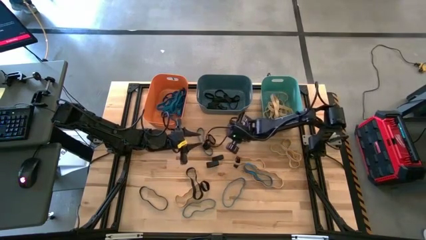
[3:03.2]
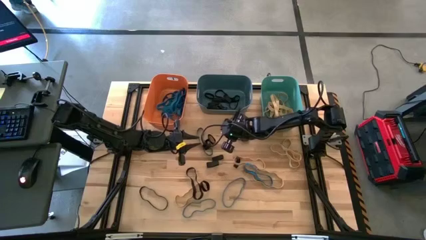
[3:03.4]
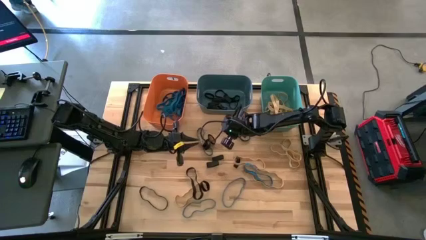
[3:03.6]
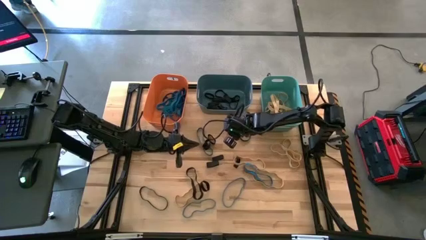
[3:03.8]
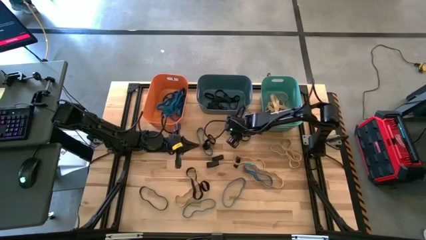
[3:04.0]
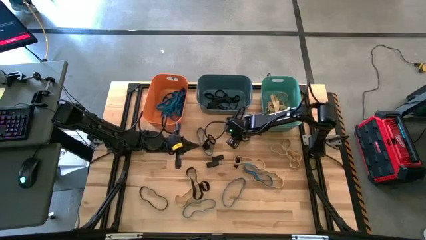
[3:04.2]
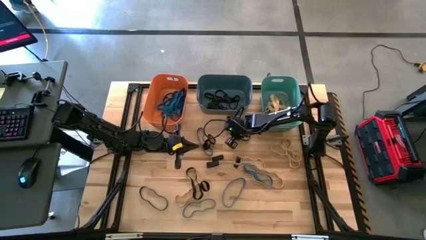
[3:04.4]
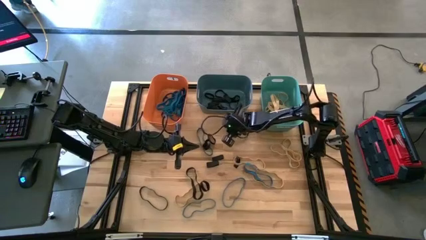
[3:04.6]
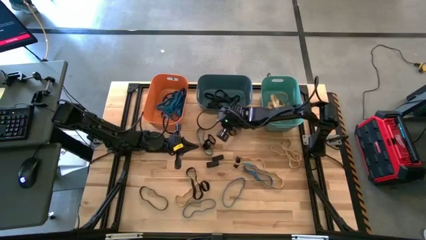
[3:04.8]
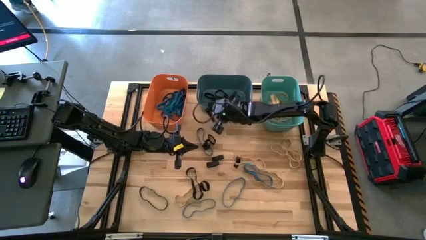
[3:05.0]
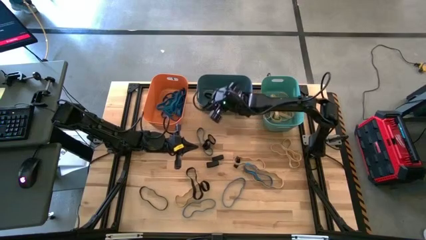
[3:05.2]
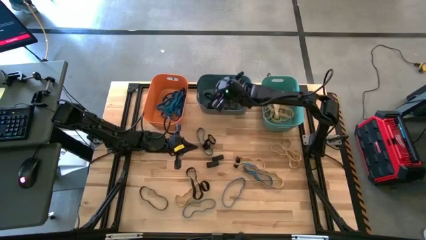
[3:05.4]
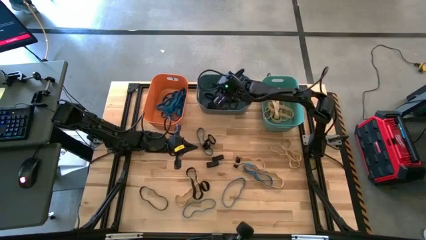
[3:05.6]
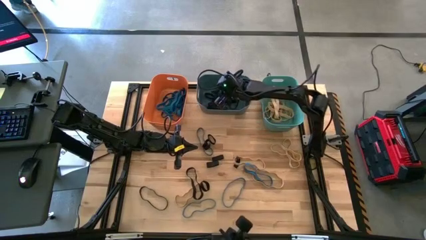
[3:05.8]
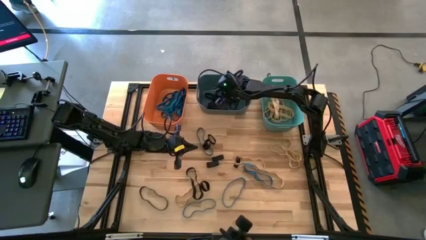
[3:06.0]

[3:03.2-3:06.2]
Task: Sort rubber bands into baskets
Put the black rubber band into the blue bin

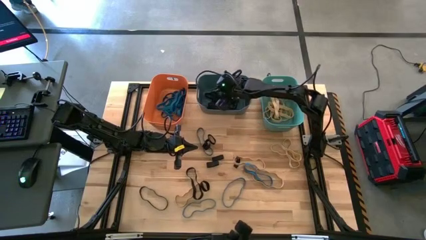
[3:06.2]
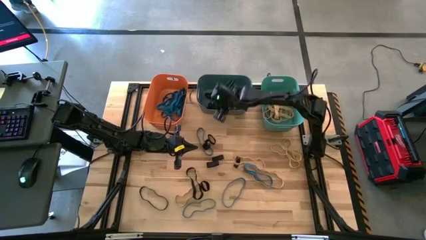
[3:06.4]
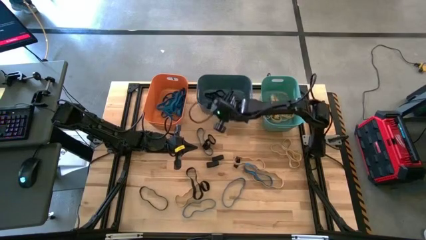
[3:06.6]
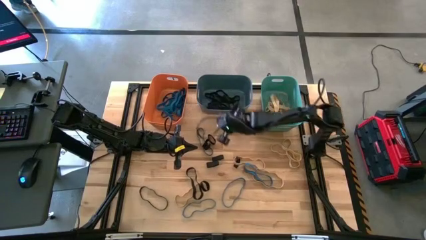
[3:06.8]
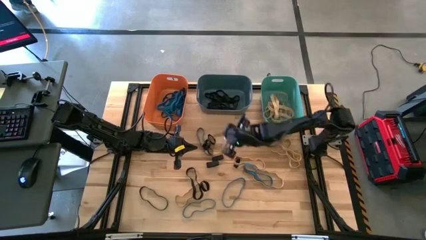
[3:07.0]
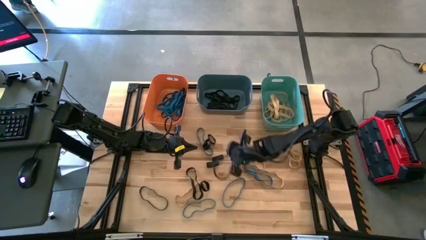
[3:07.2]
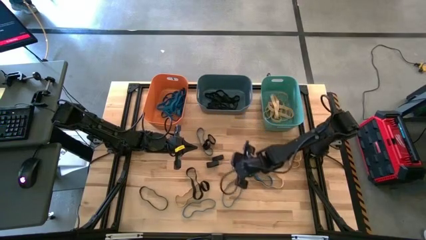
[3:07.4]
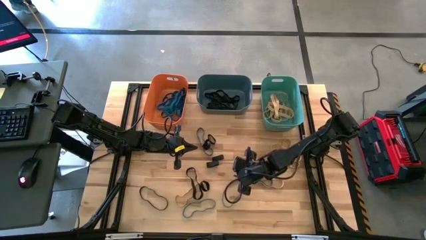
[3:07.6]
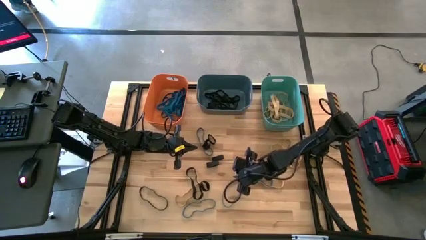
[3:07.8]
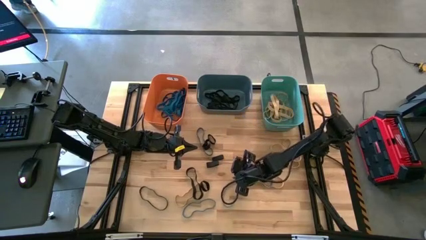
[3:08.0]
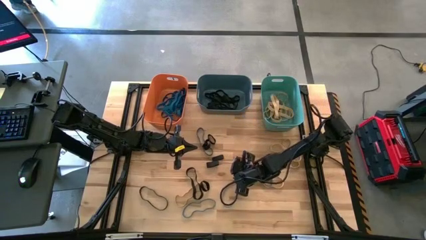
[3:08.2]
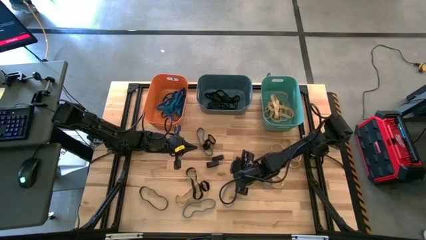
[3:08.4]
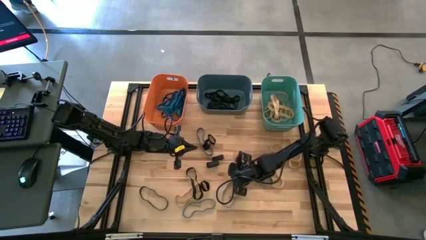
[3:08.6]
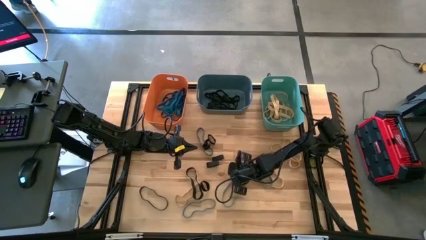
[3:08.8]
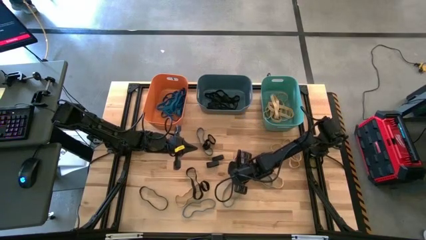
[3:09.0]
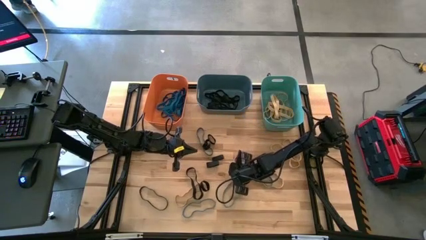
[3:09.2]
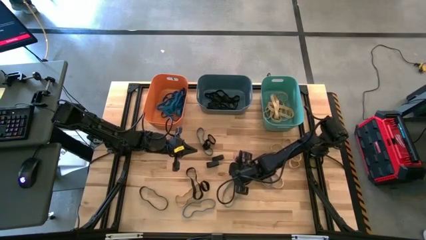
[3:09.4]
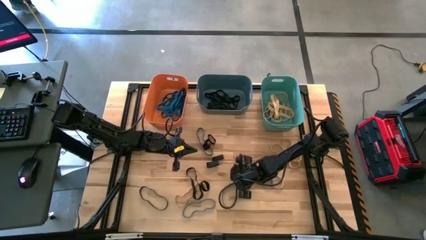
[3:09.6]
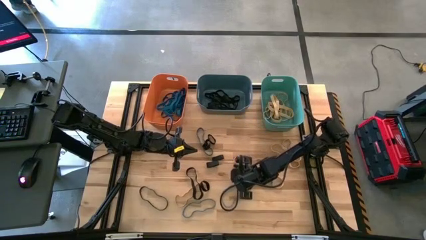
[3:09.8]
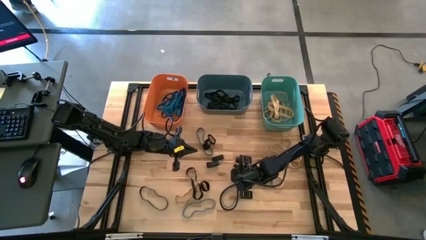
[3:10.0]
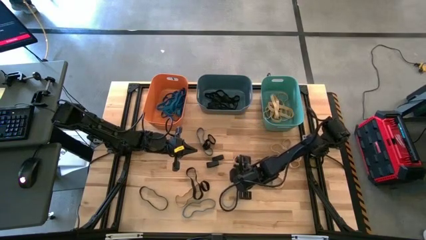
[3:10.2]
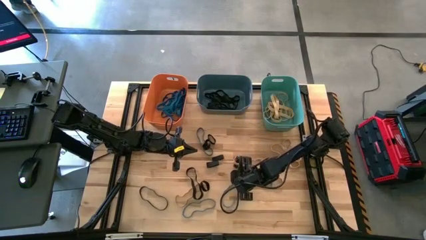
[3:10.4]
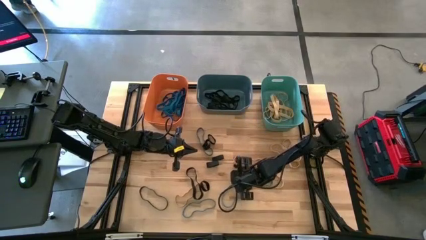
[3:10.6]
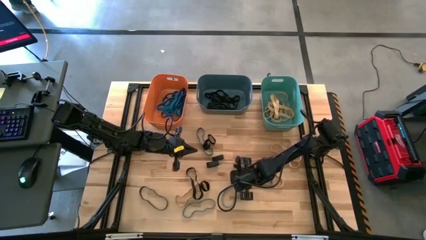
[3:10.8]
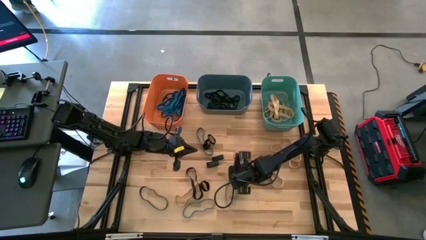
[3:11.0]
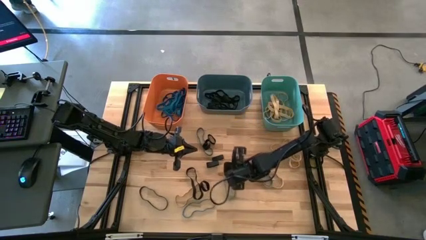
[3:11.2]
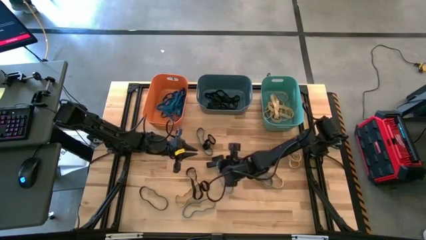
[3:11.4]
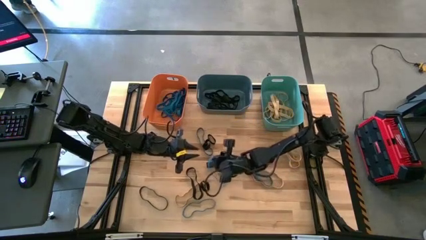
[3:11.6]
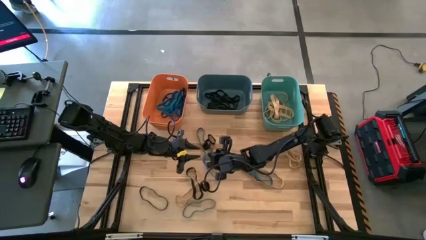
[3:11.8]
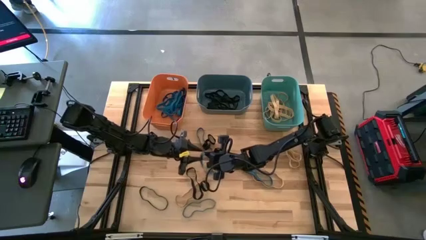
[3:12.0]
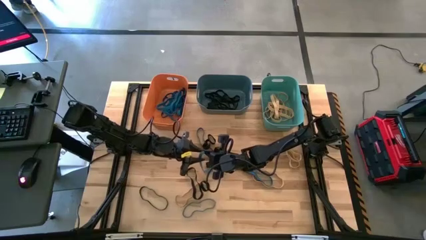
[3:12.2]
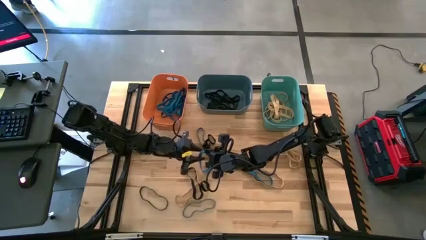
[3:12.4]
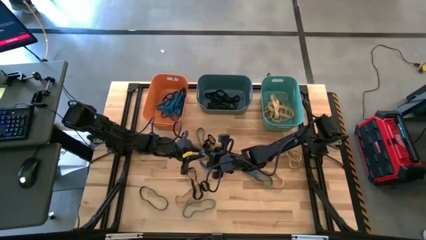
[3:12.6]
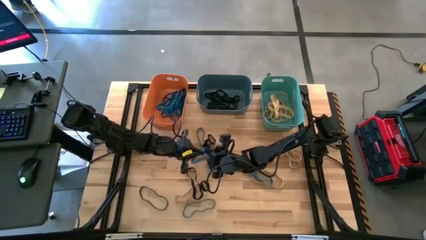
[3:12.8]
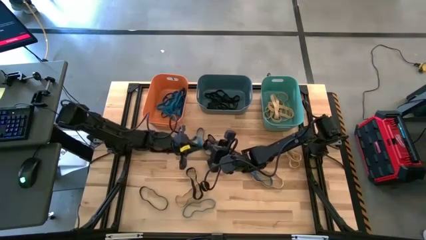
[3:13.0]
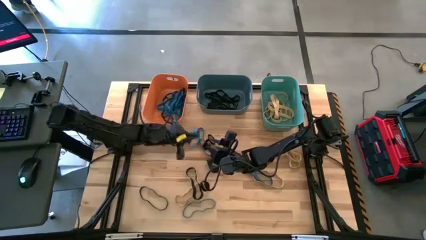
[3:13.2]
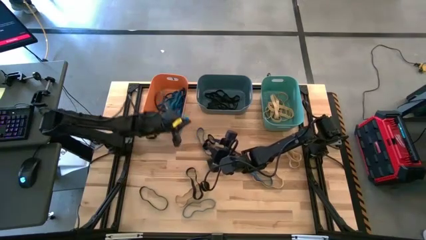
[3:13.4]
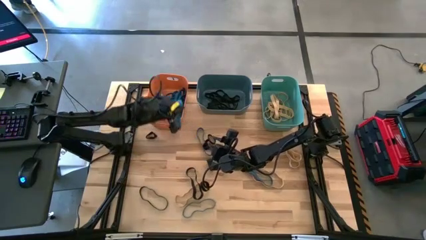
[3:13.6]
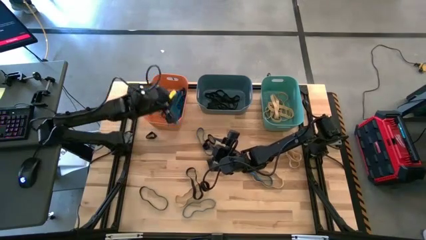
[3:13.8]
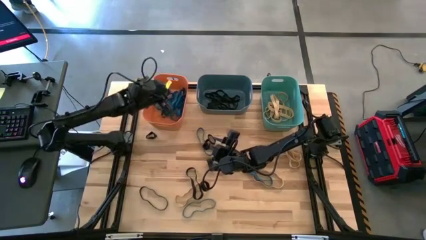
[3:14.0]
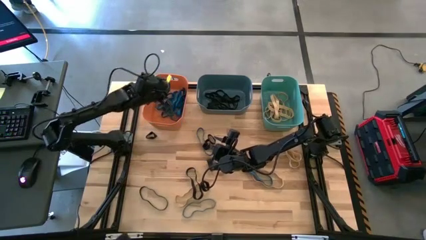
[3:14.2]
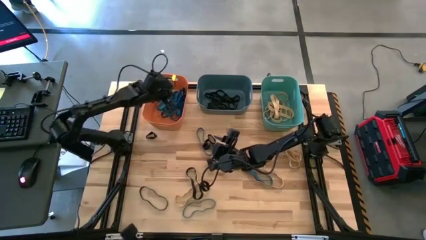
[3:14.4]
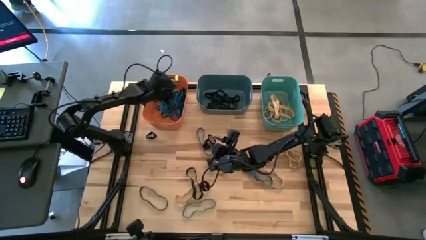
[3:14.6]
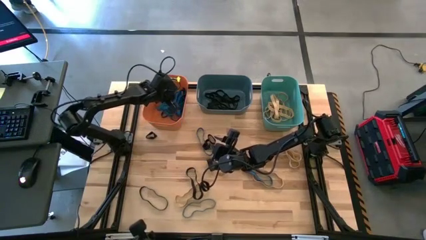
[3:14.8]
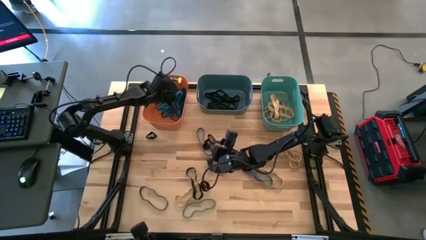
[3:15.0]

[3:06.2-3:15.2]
Put the blue rubber band into the orange bin

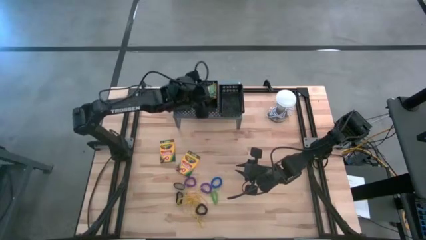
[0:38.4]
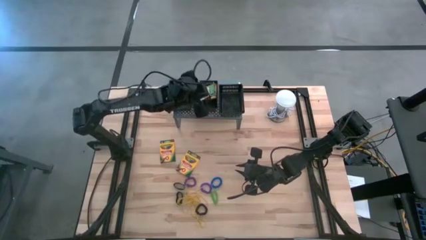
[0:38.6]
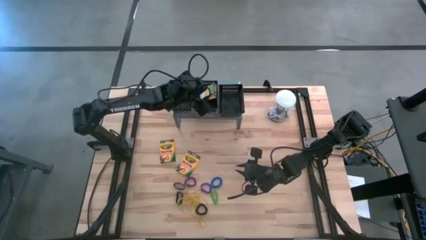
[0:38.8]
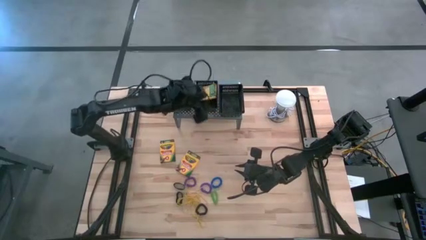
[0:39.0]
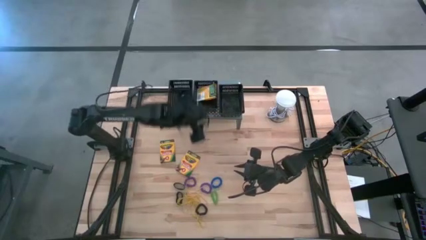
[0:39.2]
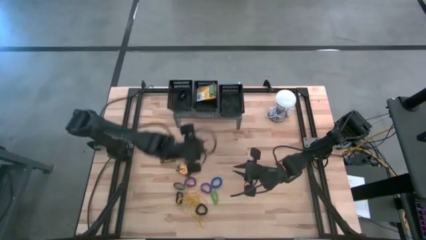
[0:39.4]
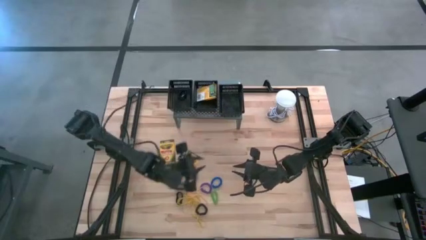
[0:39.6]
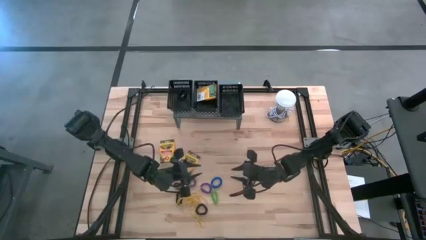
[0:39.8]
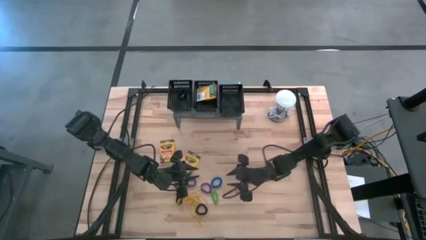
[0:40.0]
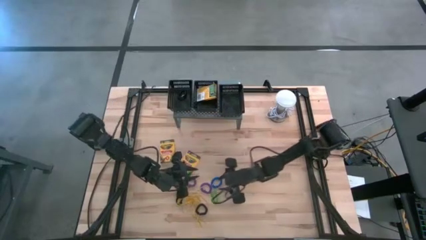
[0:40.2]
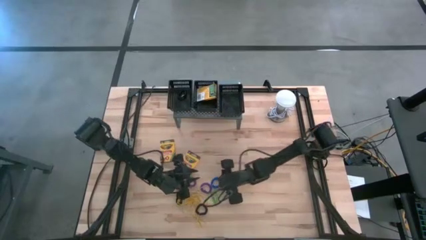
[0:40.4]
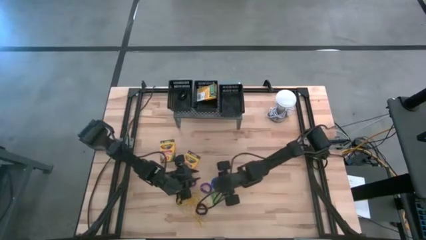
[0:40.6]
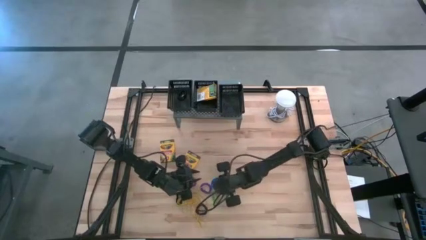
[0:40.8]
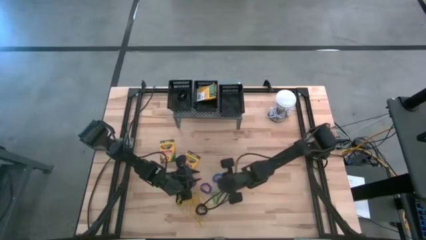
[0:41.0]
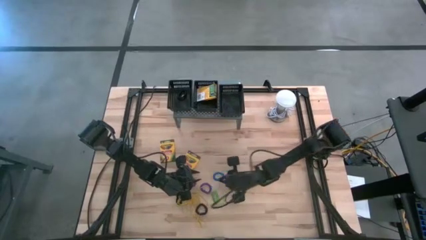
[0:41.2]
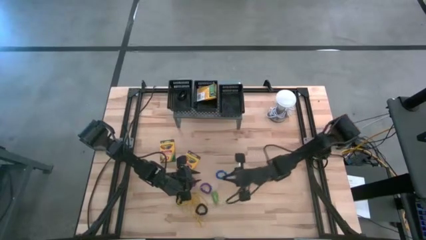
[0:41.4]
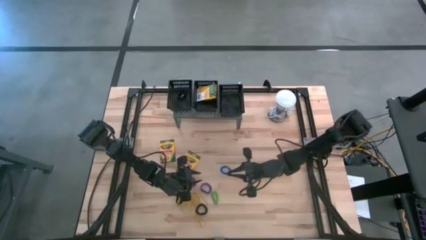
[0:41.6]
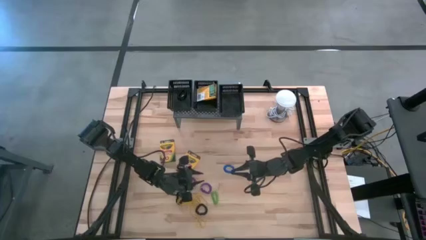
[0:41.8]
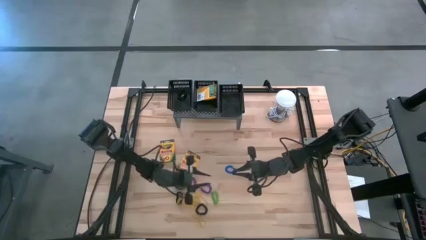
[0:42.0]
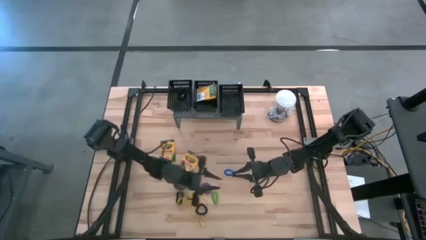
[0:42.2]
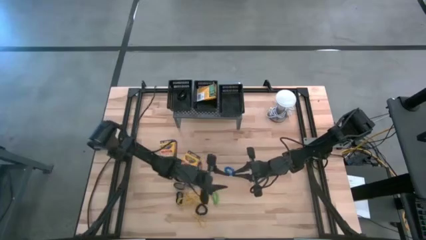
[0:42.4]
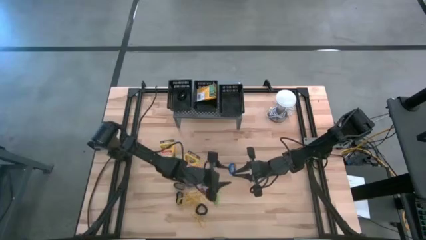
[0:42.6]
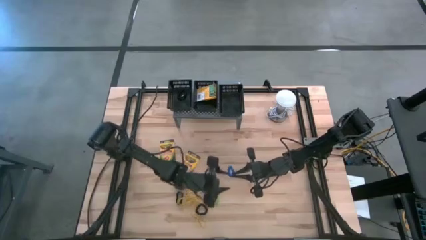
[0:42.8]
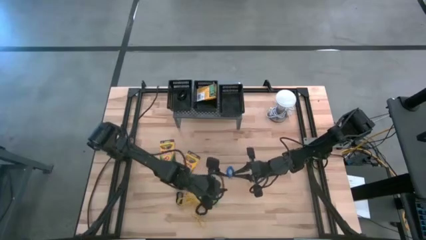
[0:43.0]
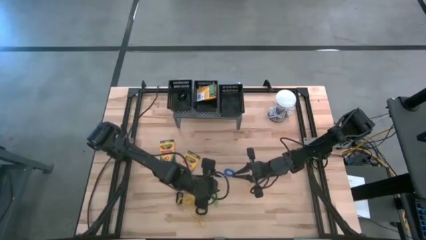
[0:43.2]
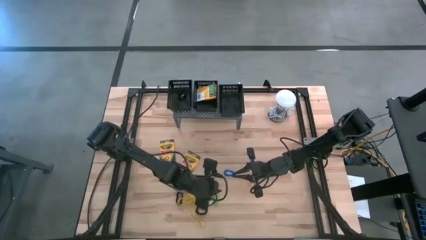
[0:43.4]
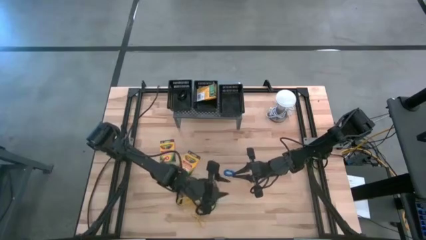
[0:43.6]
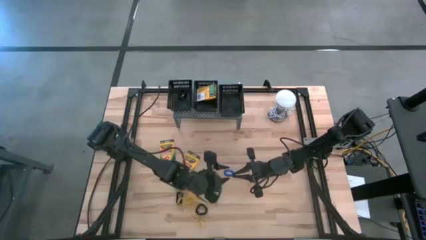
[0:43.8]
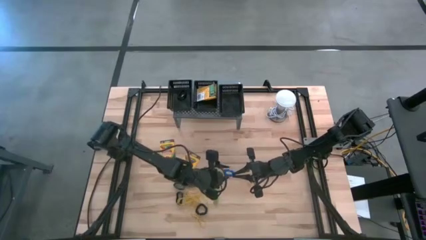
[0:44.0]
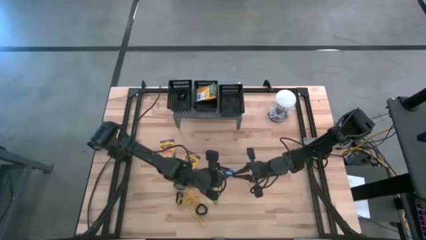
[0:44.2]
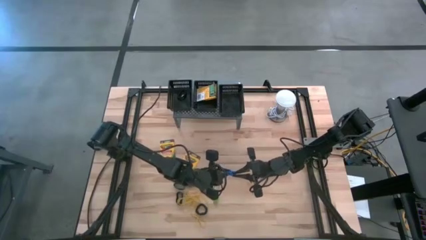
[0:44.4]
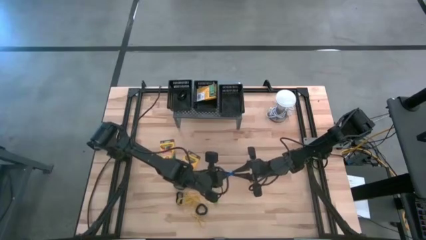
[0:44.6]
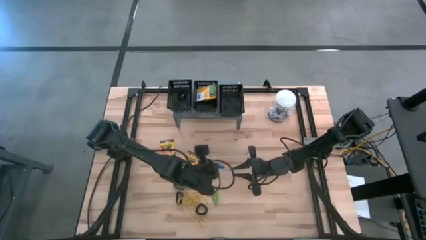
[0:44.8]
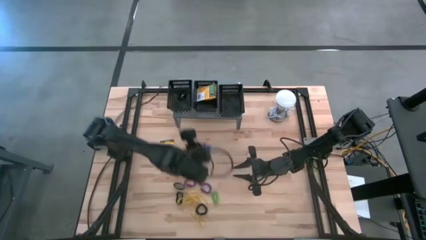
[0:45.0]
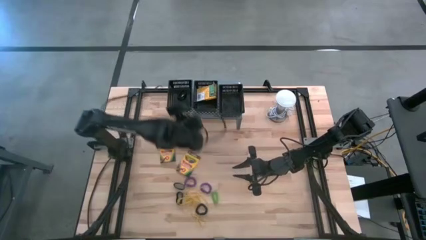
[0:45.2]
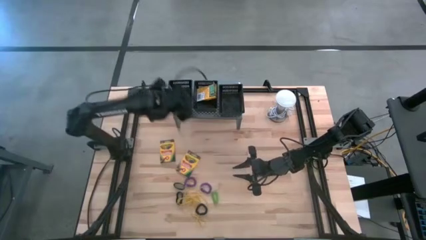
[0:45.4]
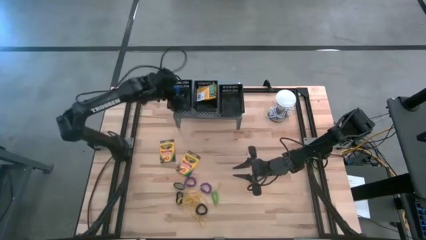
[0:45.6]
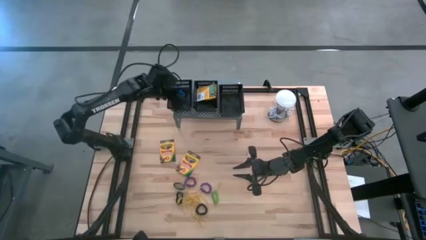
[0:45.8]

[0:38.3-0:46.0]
Task: Pick & Place Office Desk Supplies
Put the blue spring keychain into the left black bin on the shelf
